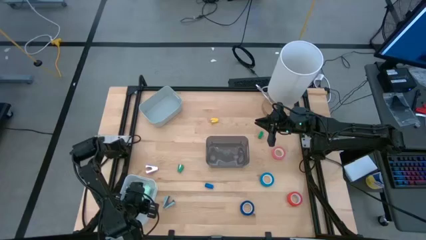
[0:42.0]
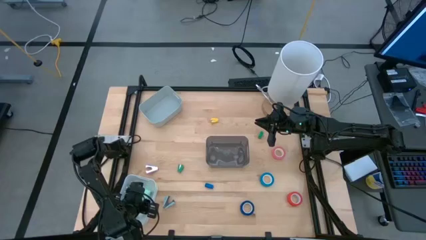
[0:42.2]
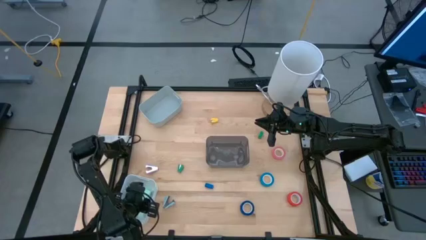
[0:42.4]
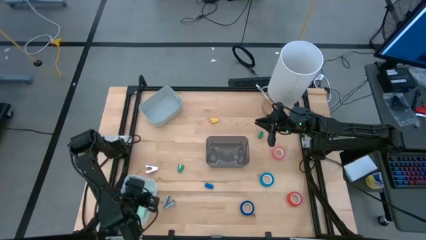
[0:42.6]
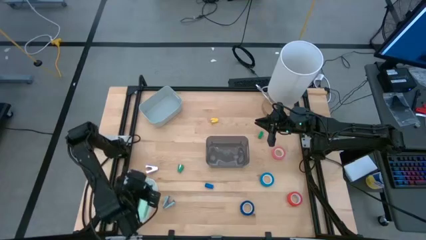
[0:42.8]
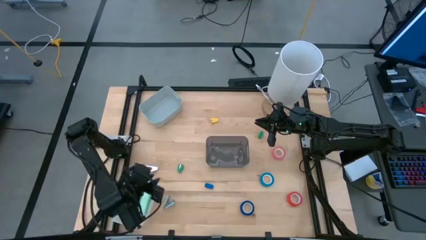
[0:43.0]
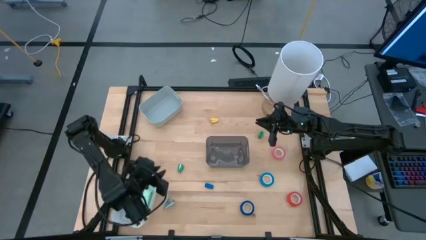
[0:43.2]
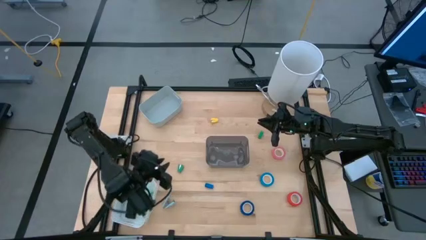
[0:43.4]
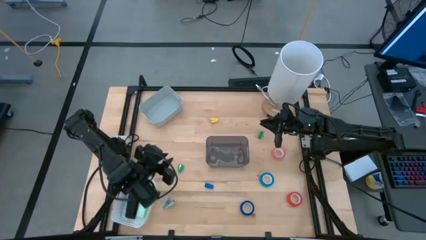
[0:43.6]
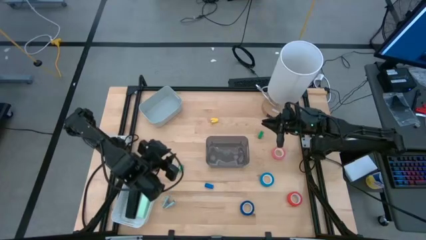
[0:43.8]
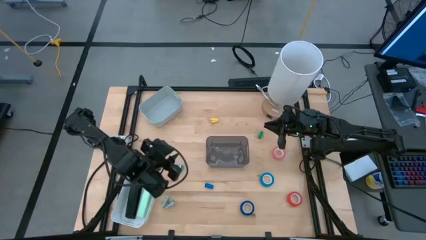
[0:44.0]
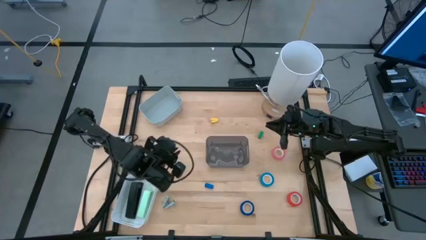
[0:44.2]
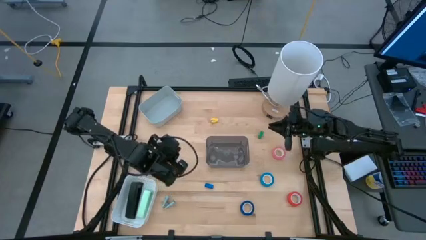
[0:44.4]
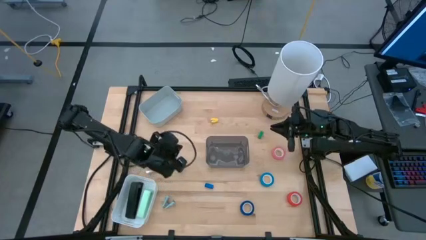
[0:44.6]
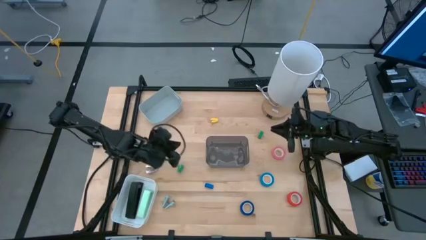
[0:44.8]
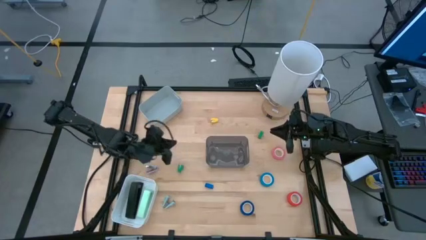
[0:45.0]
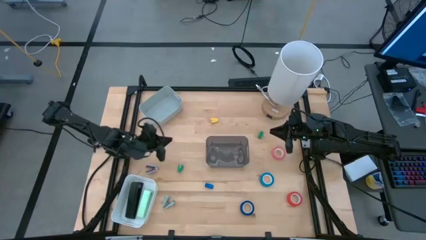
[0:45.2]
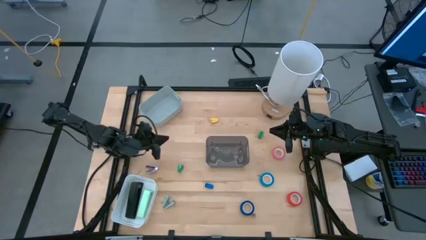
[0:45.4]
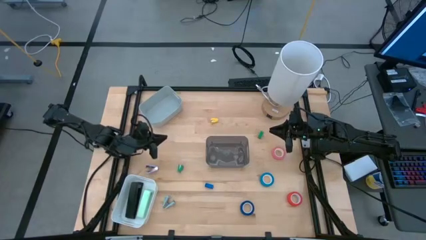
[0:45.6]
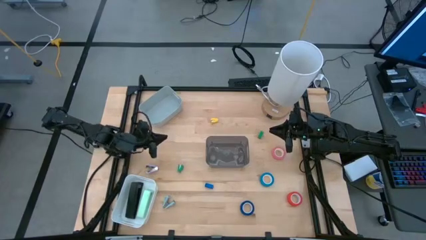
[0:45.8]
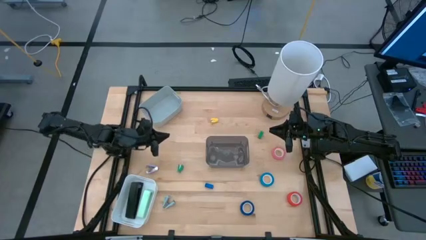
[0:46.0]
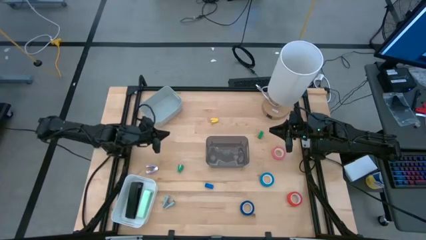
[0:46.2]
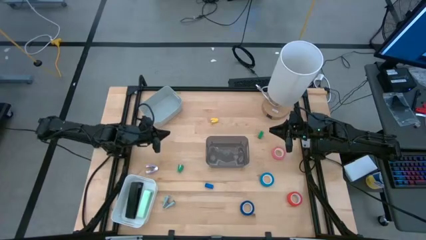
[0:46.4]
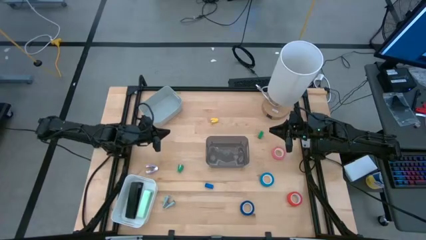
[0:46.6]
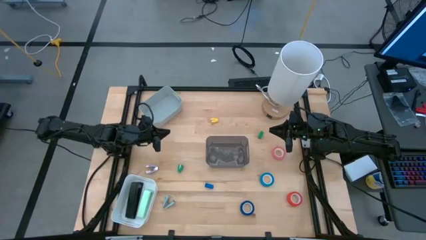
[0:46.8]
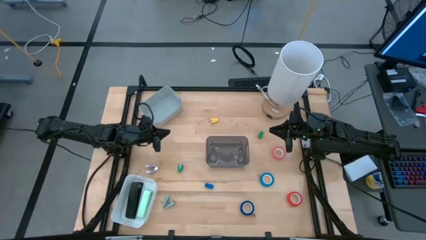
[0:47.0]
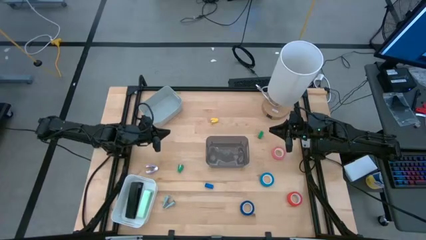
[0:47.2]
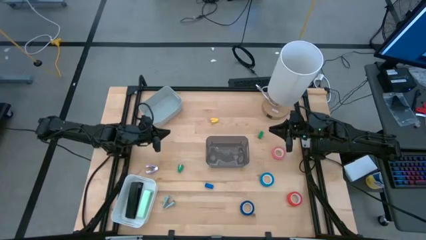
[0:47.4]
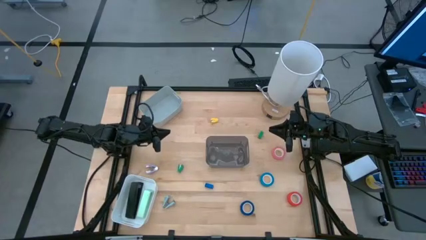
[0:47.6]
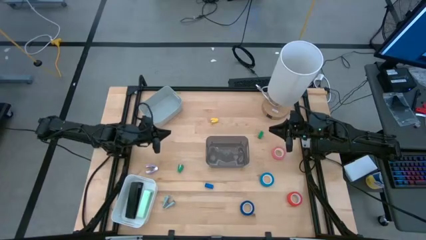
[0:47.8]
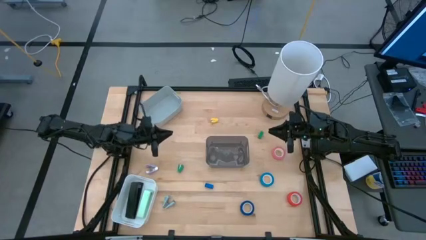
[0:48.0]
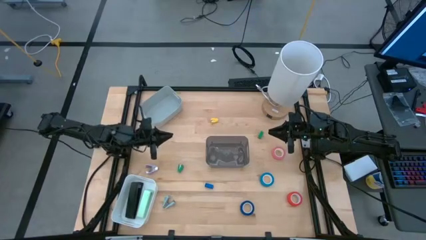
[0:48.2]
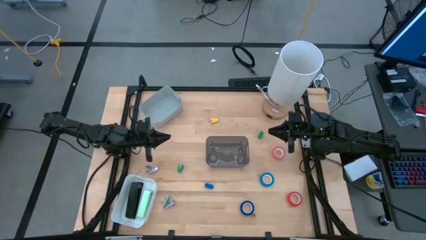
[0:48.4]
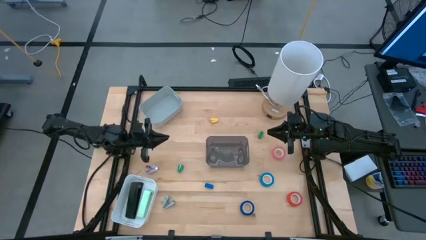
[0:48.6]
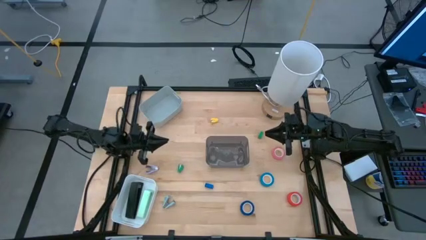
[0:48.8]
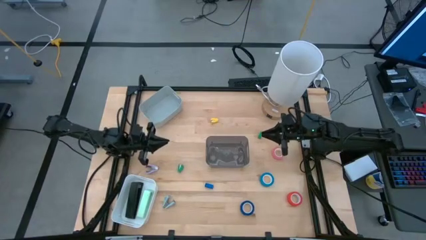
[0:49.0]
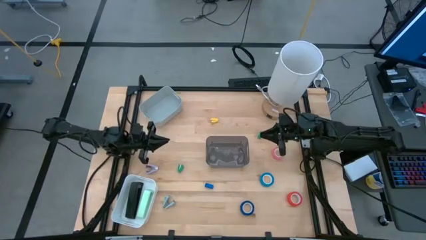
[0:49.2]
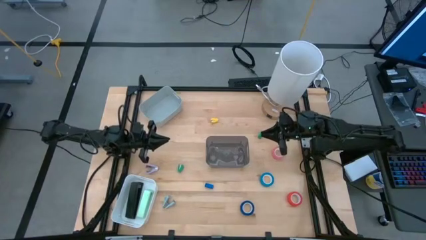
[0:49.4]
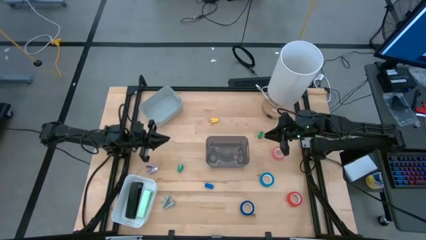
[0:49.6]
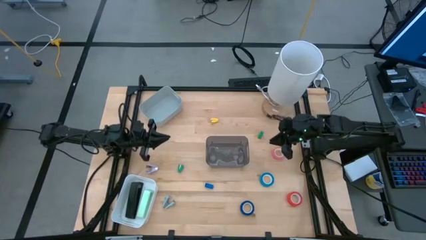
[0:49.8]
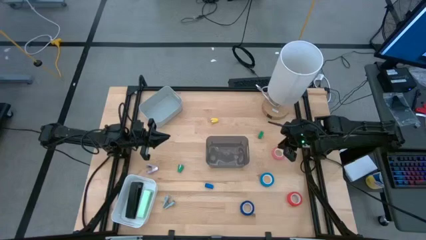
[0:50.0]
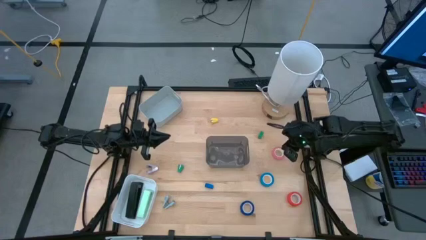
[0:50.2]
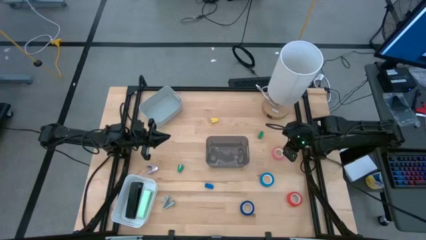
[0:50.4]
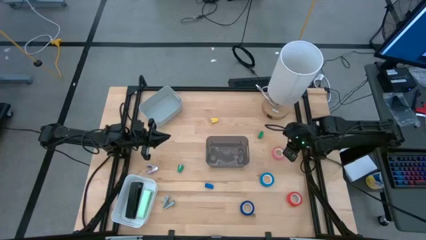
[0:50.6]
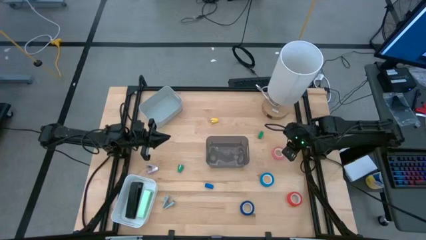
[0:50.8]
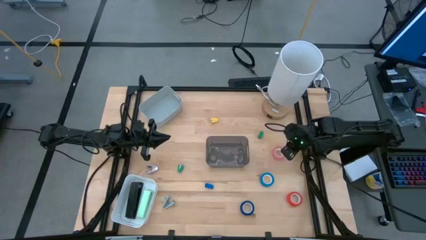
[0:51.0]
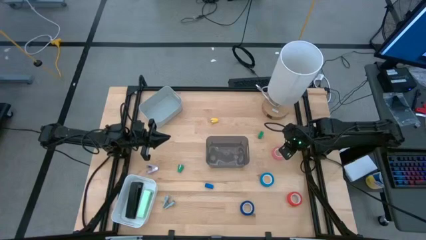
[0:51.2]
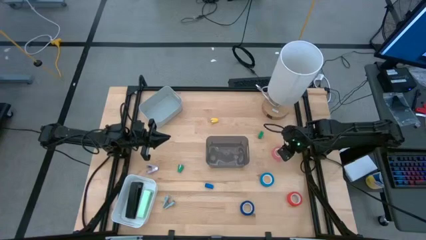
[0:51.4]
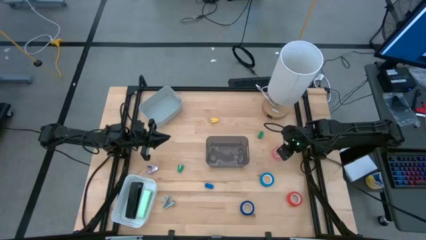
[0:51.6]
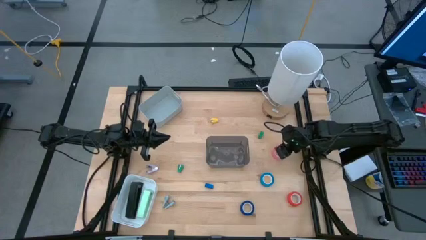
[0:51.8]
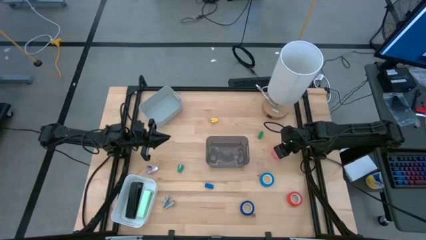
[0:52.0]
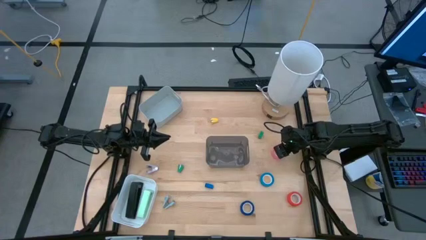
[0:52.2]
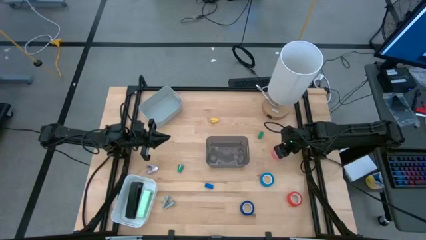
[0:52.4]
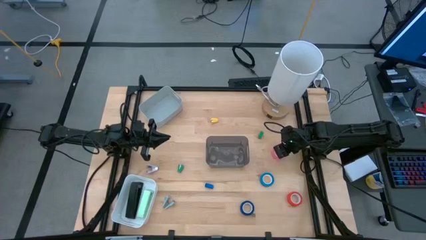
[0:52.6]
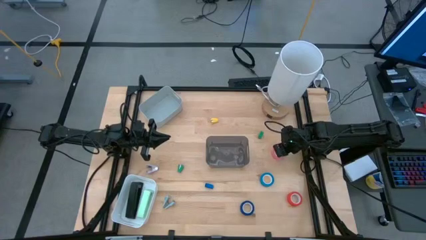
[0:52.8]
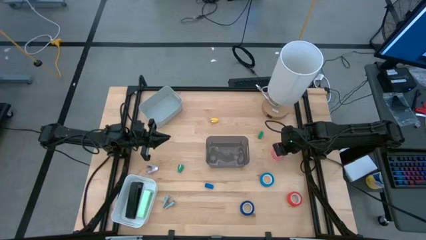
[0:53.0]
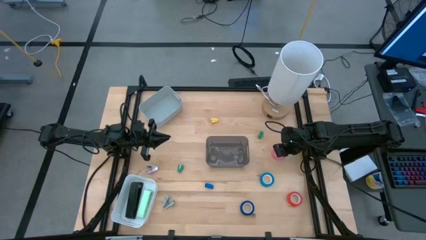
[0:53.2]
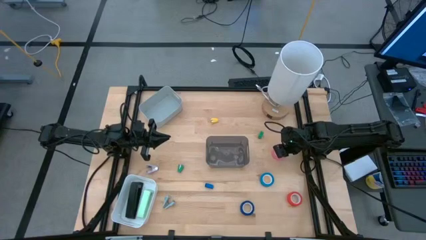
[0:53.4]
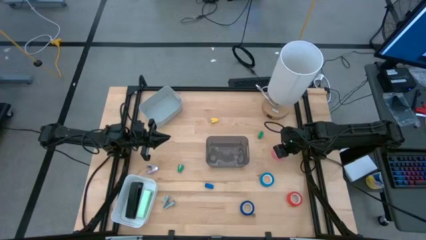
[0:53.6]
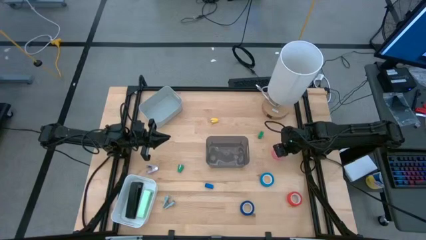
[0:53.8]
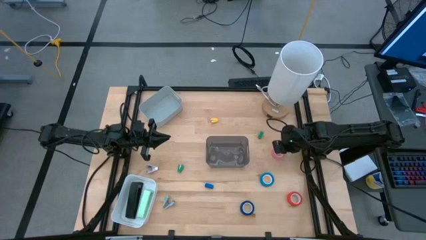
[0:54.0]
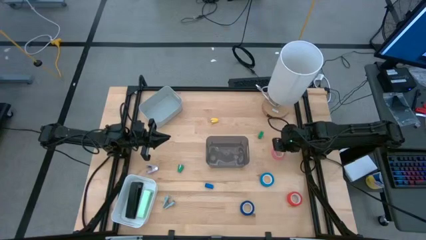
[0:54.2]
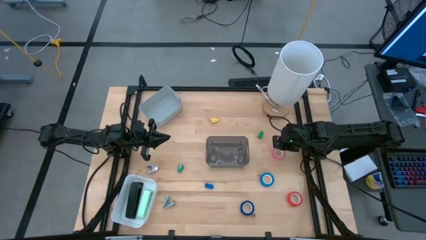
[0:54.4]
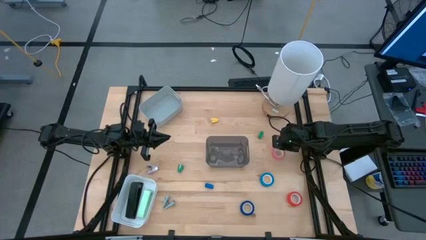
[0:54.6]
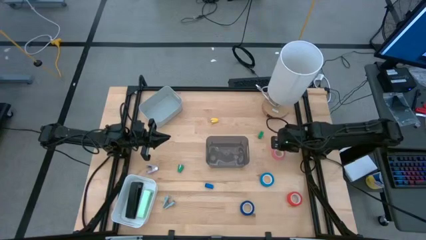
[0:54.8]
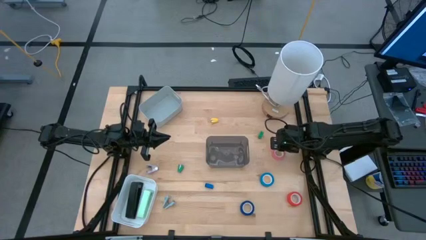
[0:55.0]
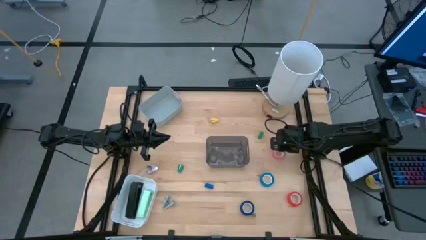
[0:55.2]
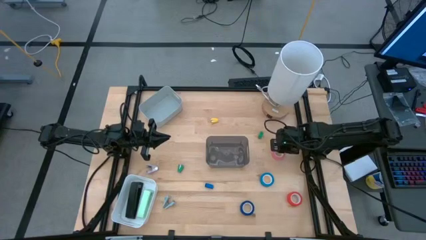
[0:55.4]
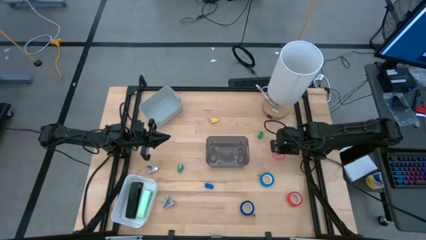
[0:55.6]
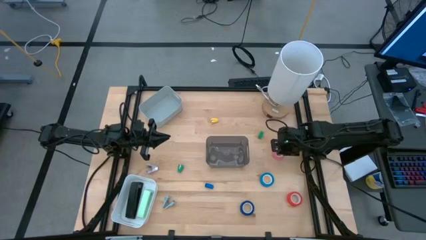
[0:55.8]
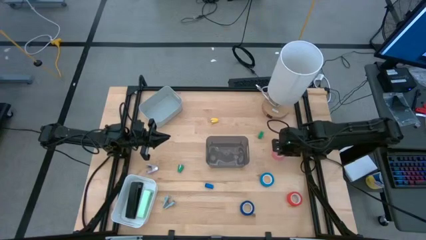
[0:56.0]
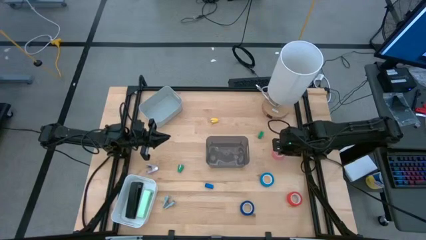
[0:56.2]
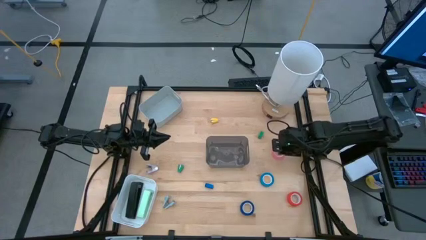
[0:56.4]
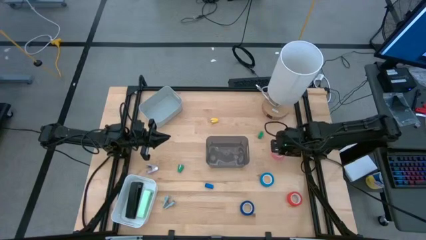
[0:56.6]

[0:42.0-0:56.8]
Task: Pick and place Stapler, Stapler remover, tape
Put the pink tape into the grey bin

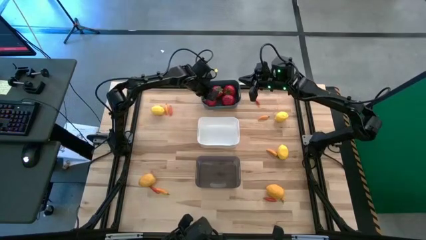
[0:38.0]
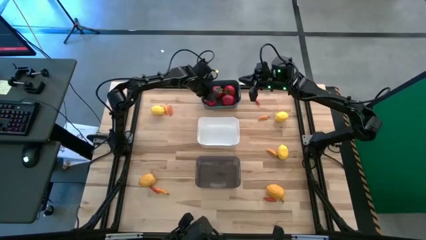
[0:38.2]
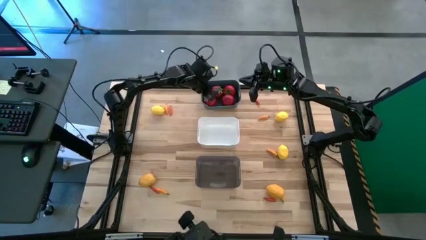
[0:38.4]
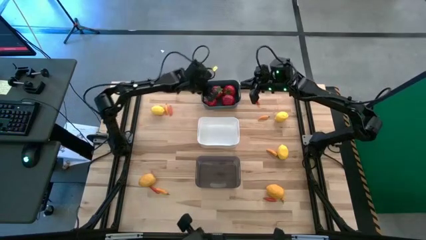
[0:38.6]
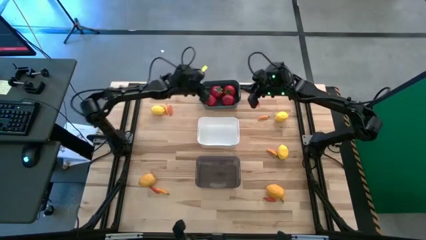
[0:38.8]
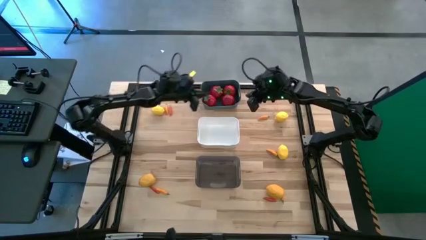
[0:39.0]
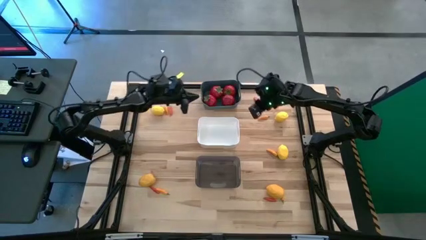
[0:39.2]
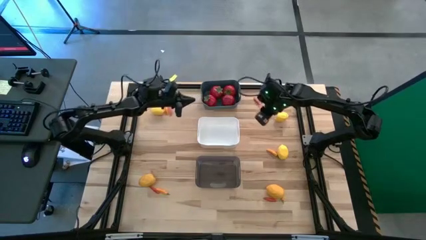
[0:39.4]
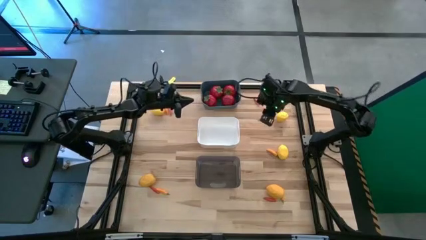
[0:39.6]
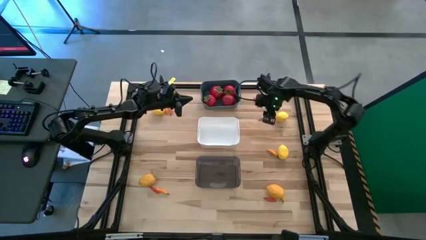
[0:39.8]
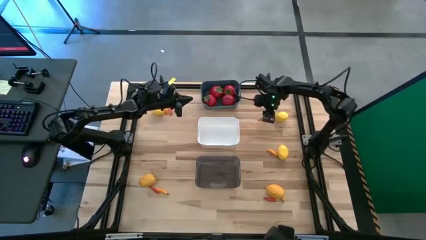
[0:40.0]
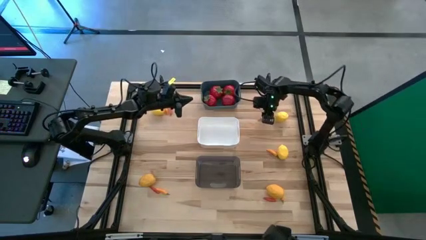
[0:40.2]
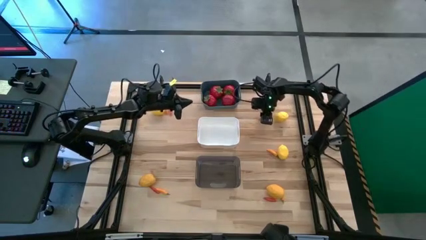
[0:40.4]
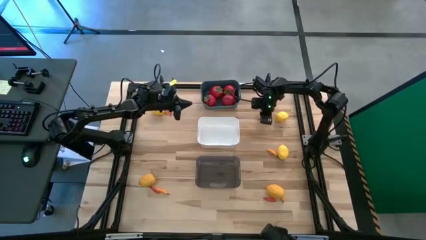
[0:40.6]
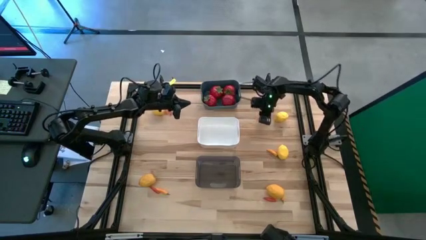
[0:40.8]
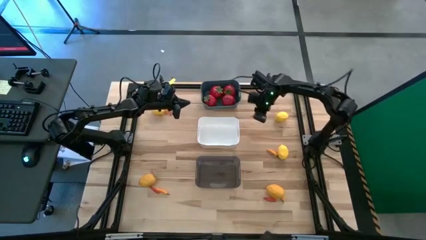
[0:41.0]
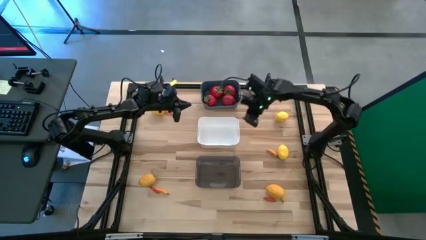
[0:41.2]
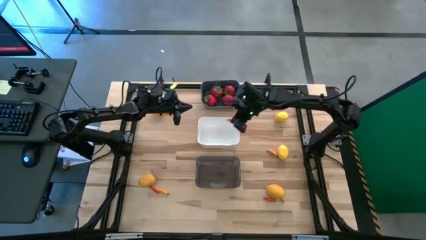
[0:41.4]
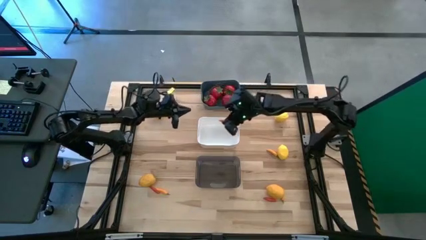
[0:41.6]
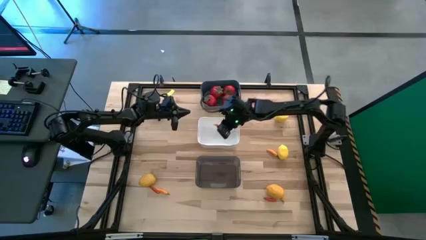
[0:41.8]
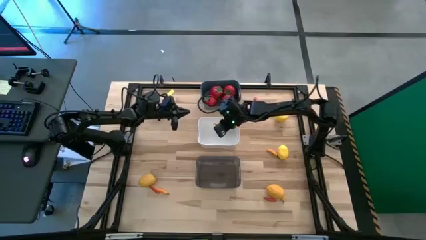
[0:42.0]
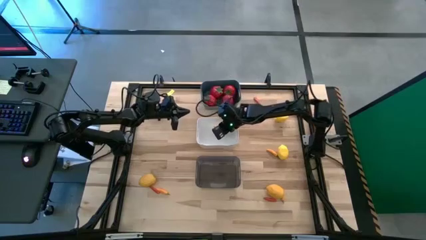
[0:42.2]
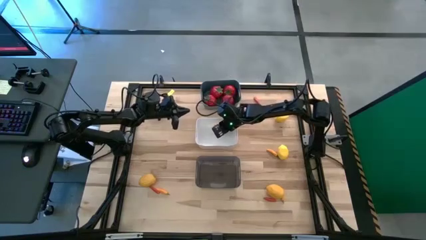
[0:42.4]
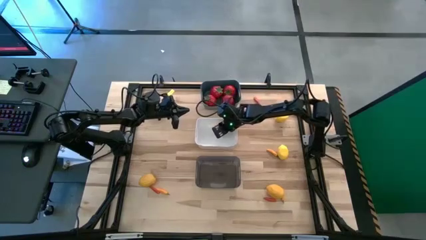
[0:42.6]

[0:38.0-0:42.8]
Task: Sort produce into baskets
Put the orange chili pepper into the white bin
